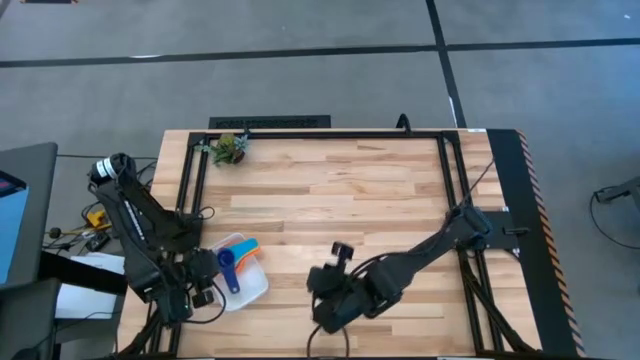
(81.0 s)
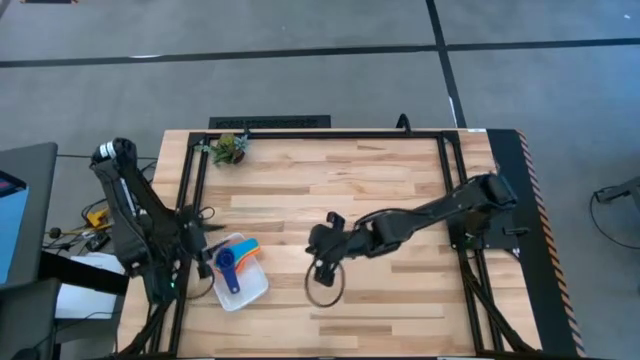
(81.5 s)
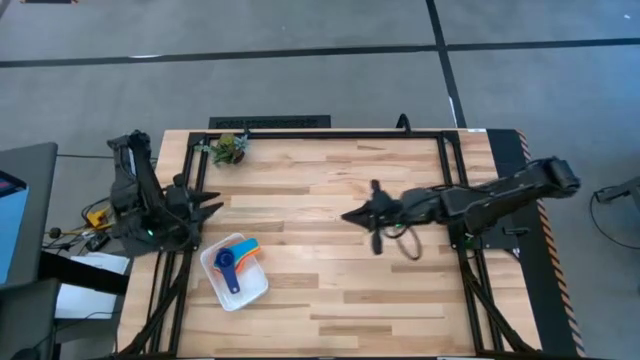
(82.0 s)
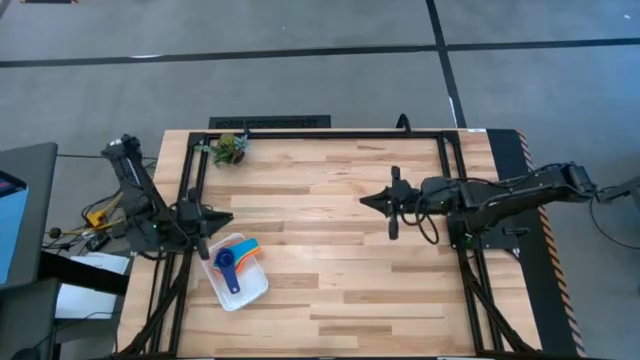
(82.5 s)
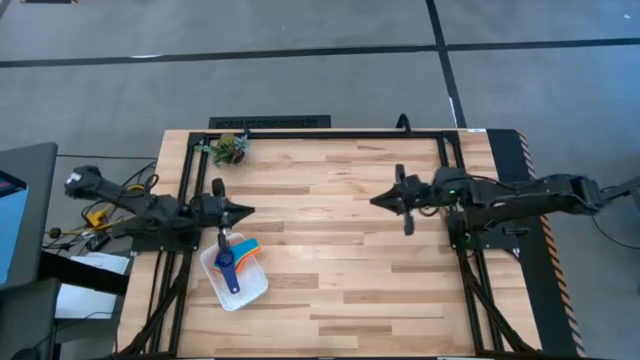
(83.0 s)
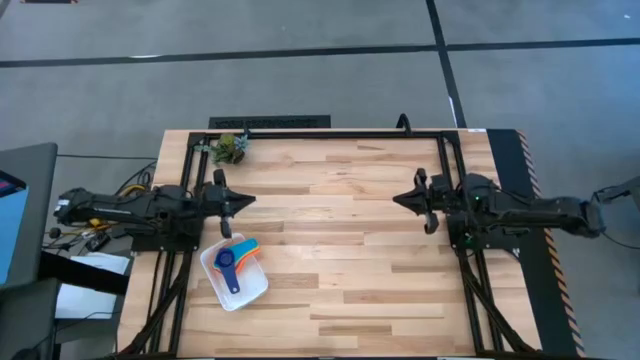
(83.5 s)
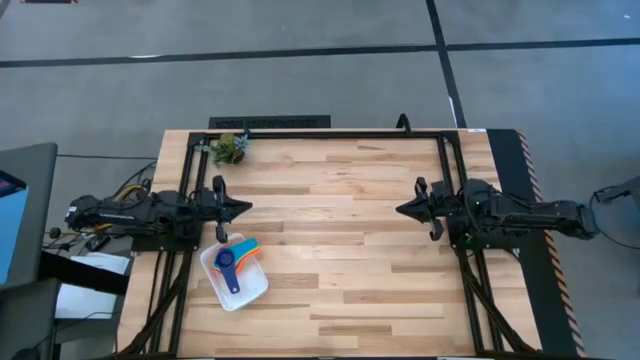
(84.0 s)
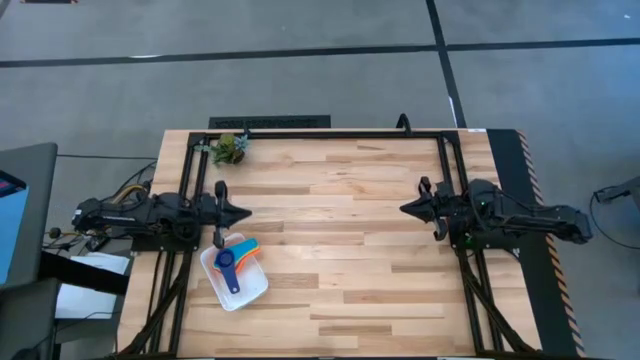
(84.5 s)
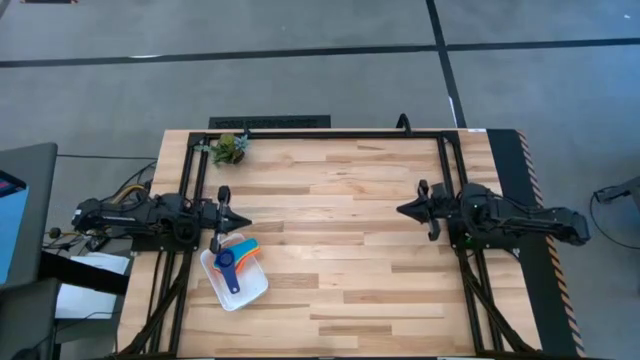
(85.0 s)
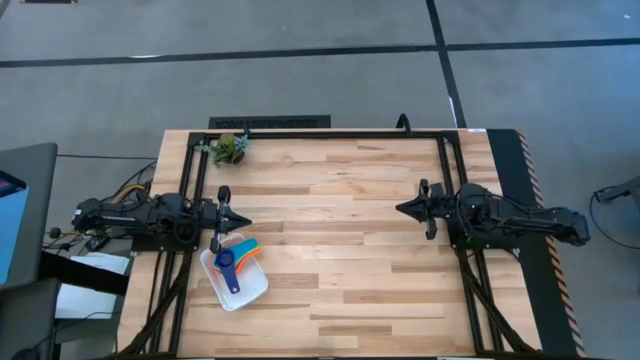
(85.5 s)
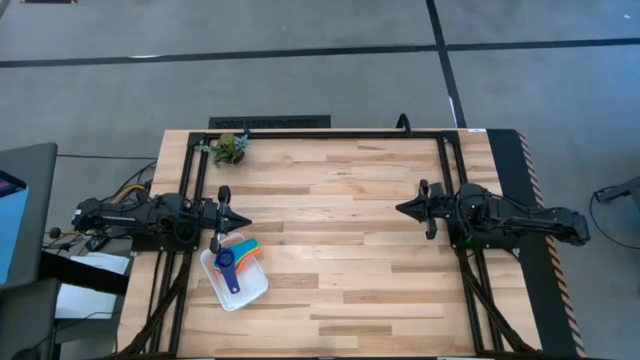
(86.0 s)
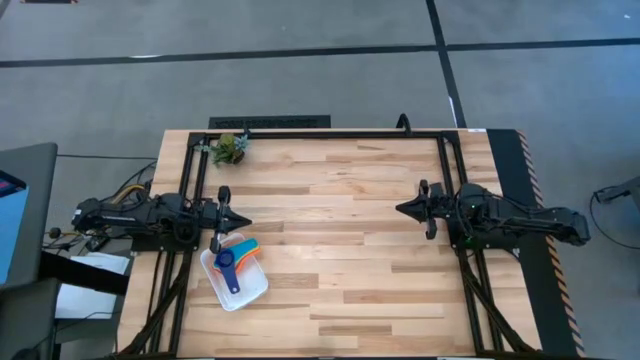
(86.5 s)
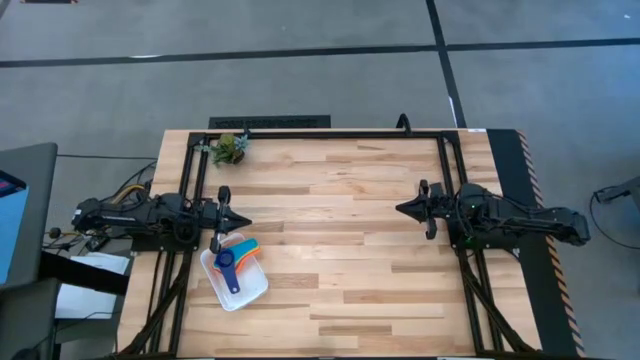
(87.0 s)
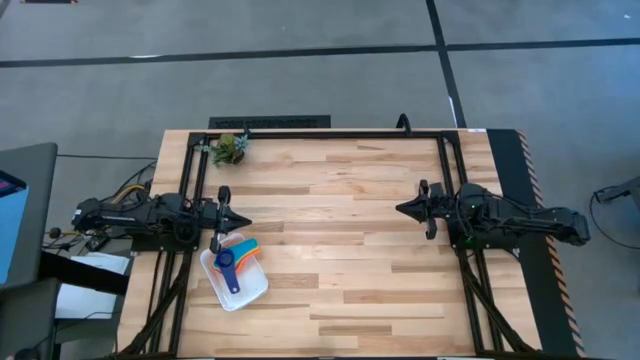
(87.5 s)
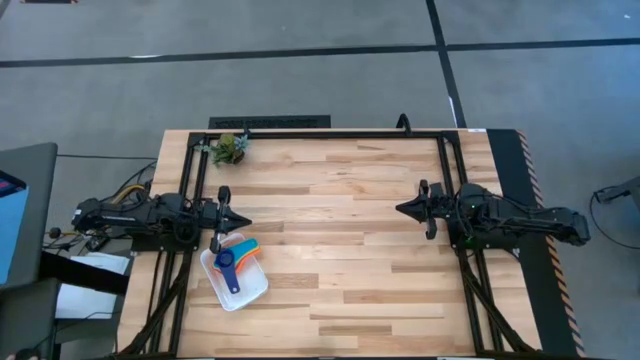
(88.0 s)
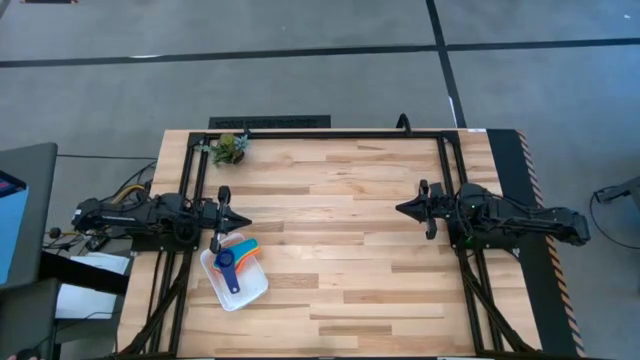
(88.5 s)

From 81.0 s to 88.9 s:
Task: Nest measuring cups in basket
Return to Home Position

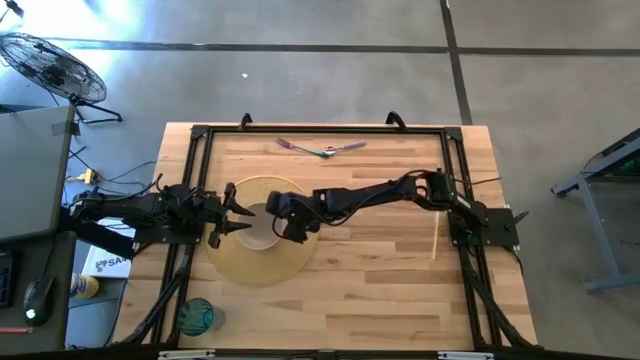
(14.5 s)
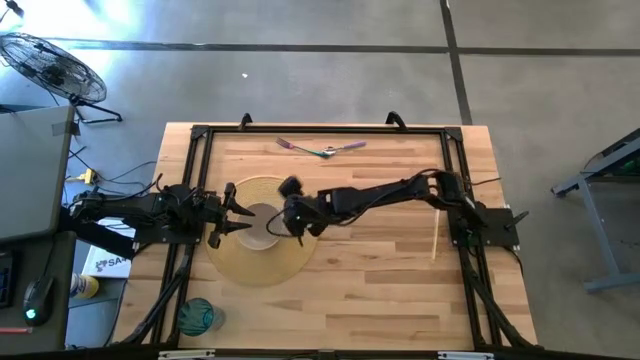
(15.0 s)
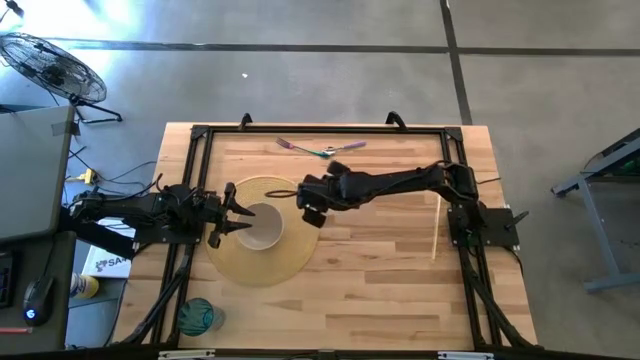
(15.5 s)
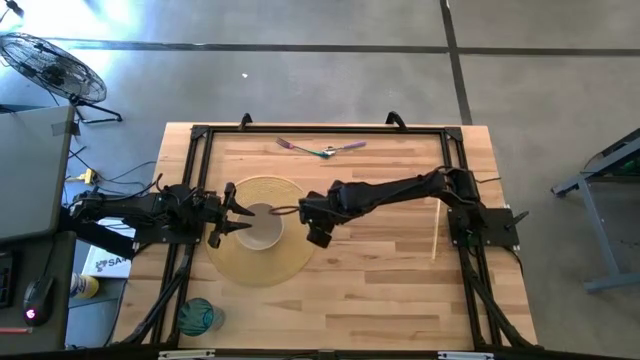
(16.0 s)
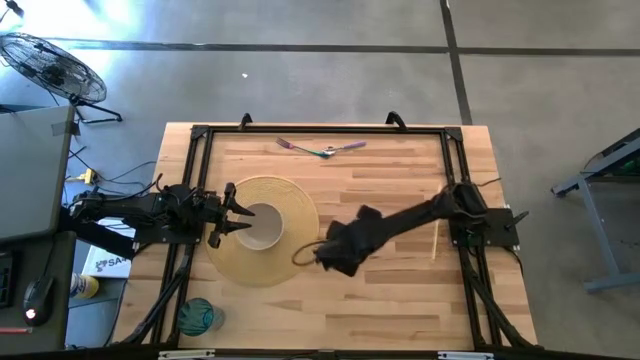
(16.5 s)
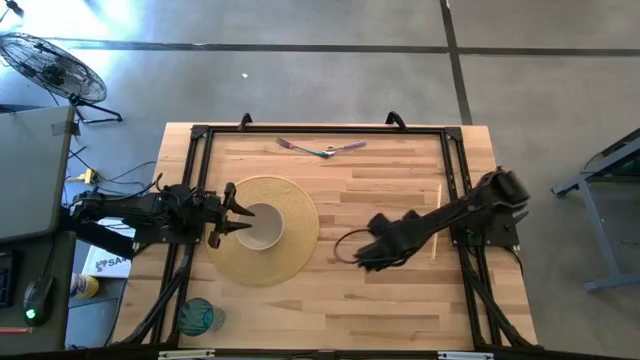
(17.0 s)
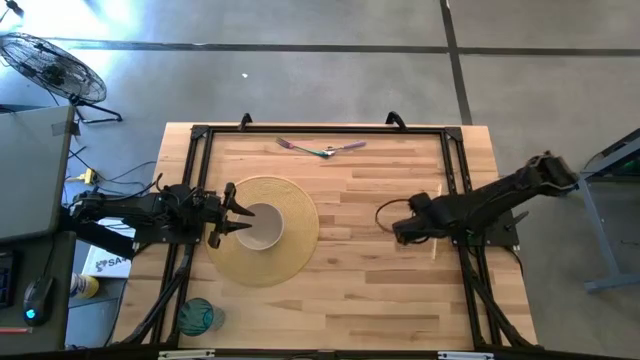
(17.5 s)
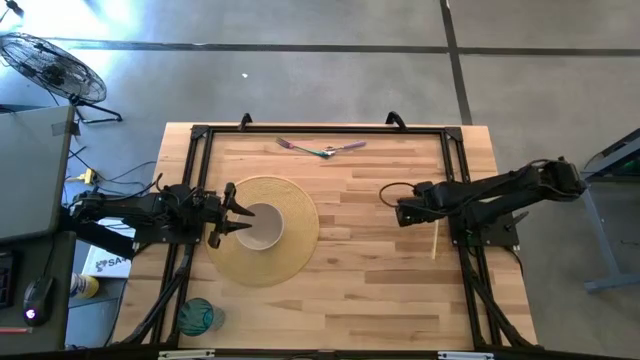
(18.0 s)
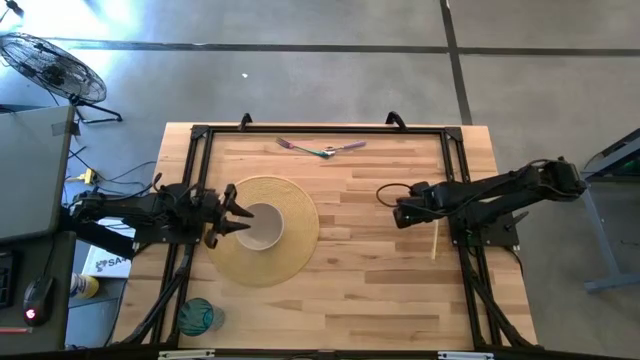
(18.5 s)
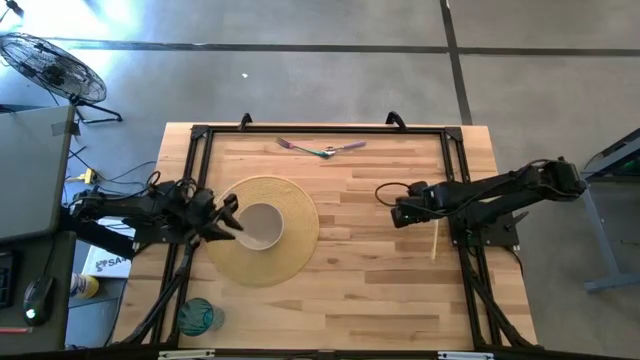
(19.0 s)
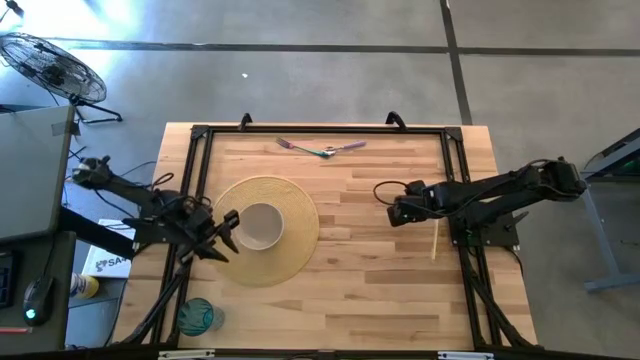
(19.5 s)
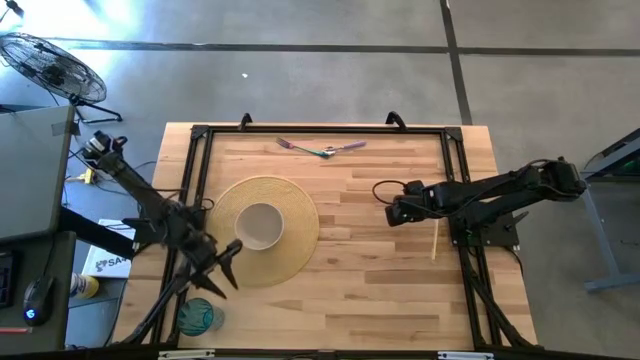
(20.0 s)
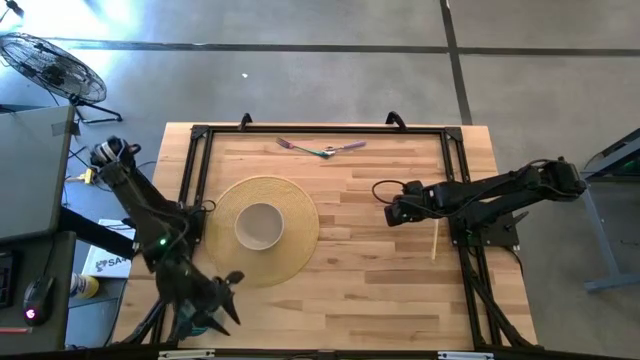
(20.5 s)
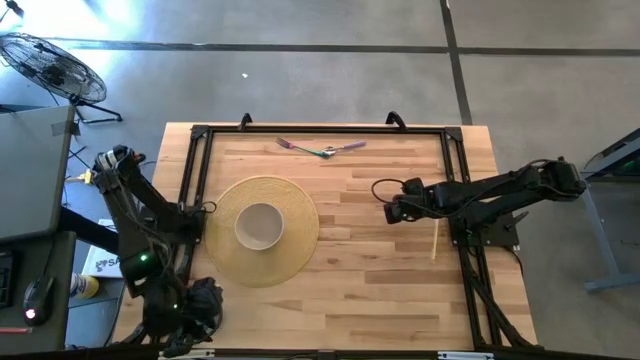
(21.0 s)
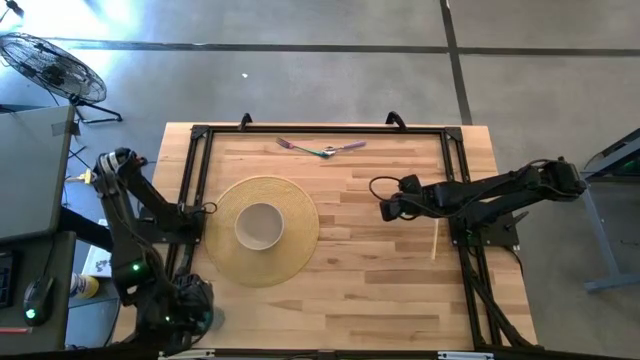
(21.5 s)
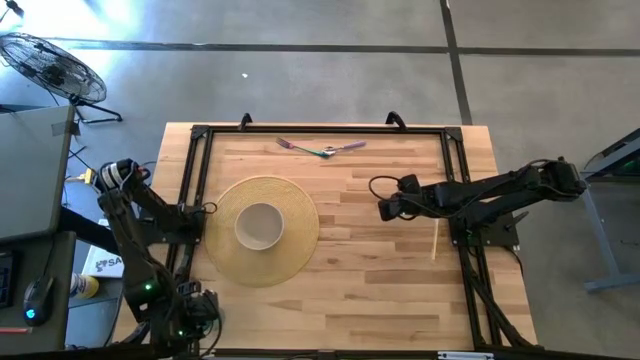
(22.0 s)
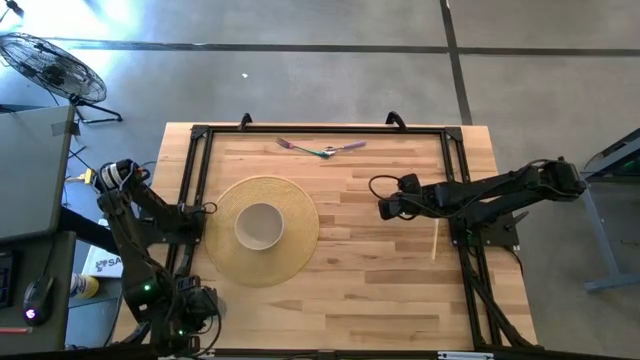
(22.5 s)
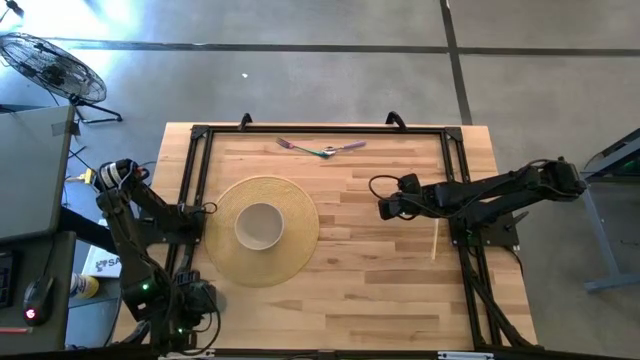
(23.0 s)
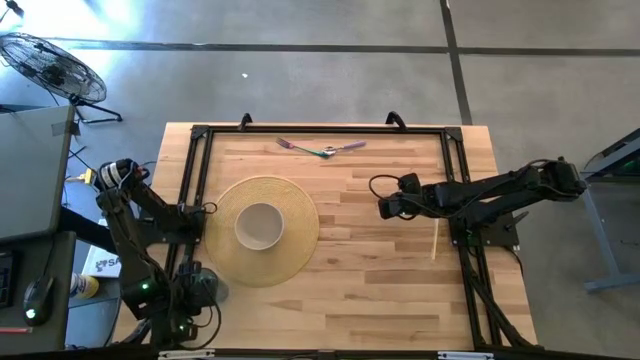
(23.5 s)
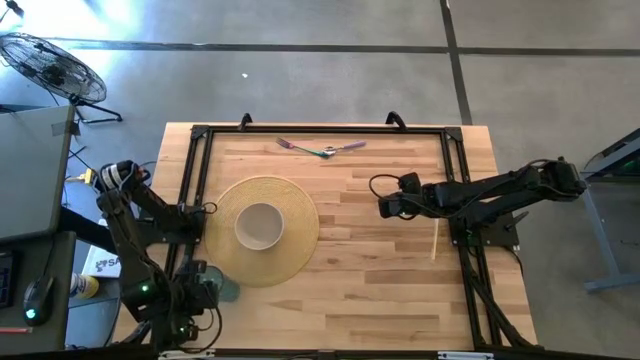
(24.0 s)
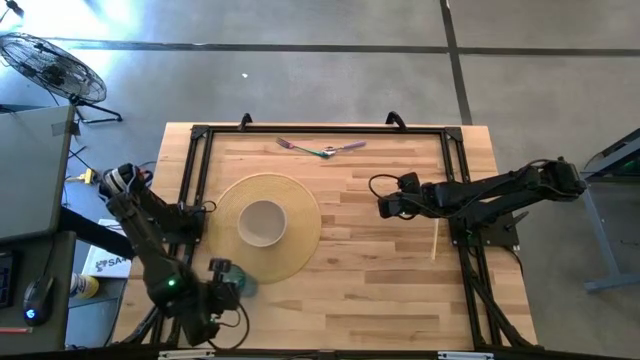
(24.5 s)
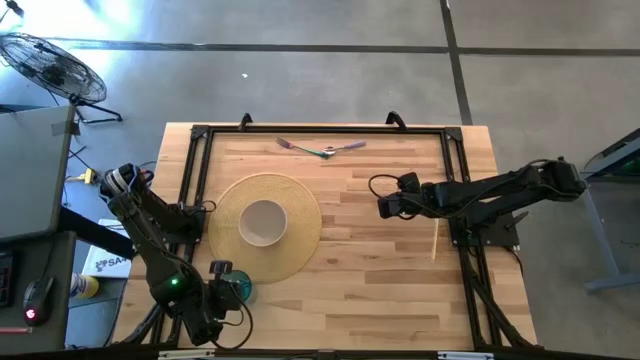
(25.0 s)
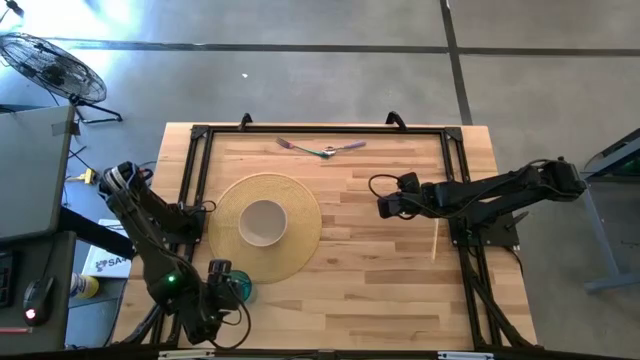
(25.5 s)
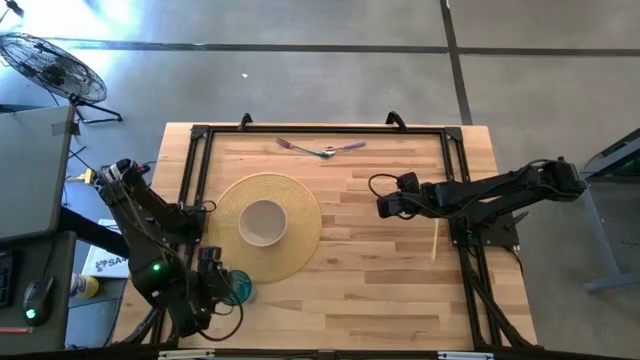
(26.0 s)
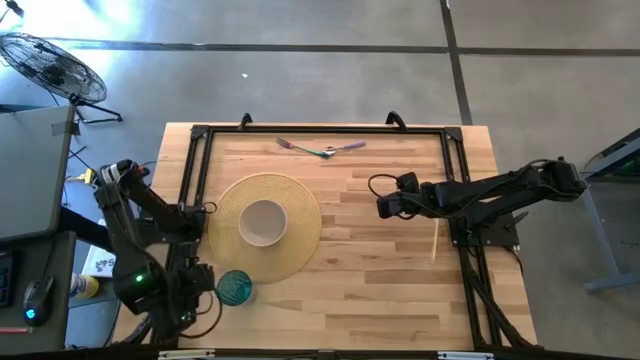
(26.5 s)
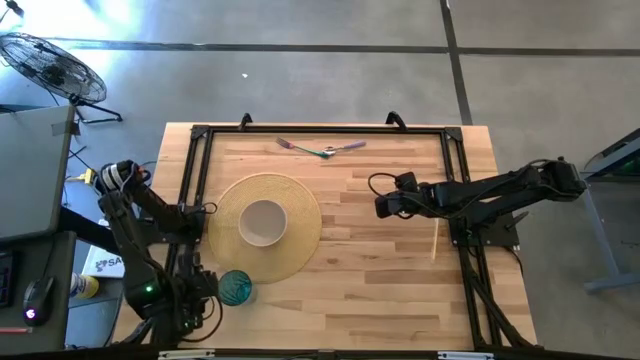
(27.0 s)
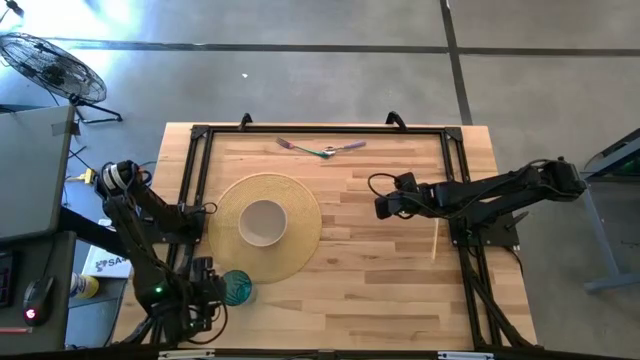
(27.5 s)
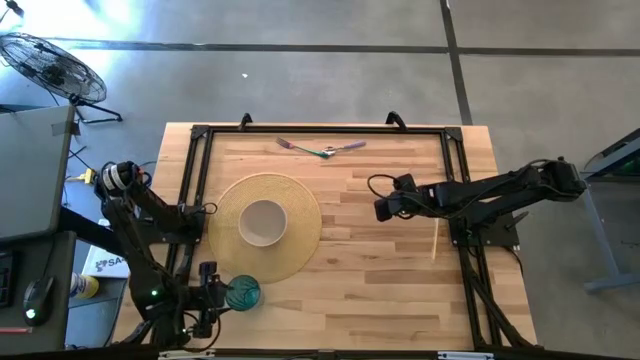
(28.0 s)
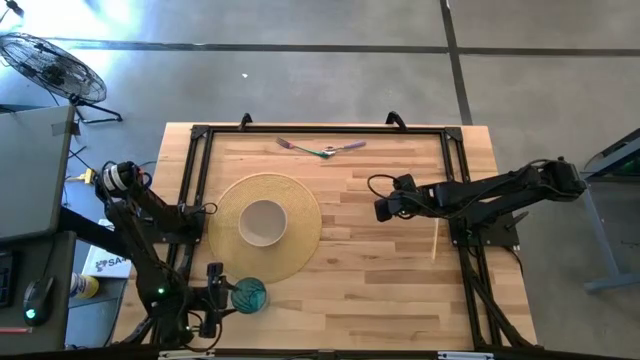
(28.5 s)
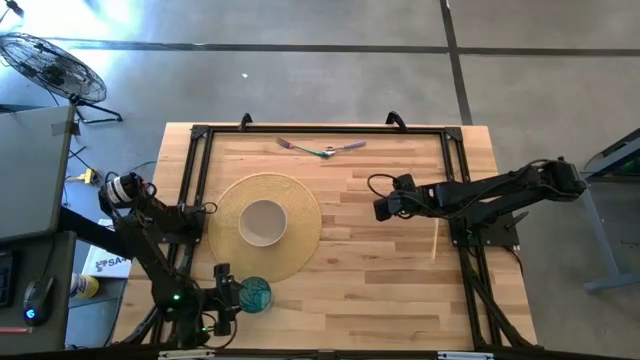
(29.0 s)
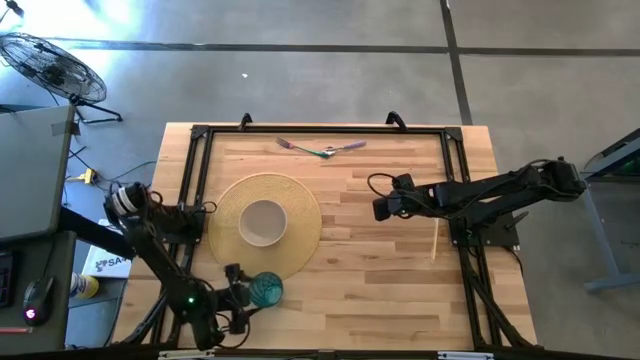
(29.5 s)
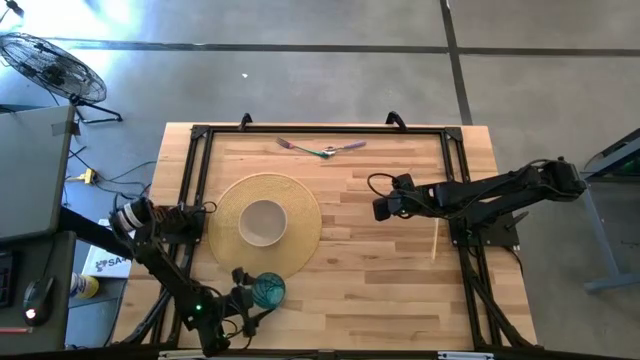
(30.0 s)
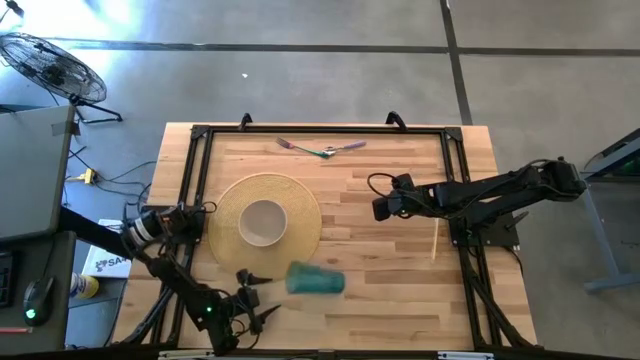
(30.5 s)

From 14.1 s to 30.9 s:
Task: Pick & Place Utensil
Put the cup on the brown mat
